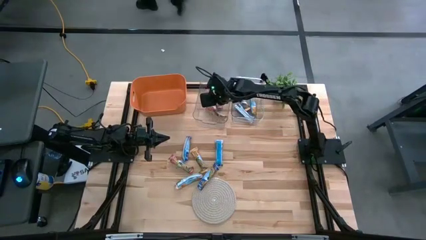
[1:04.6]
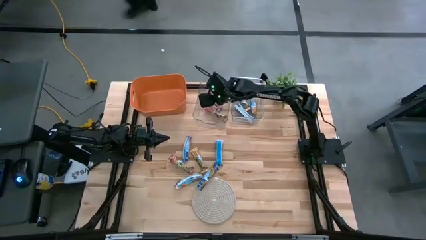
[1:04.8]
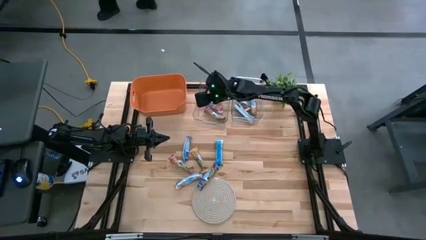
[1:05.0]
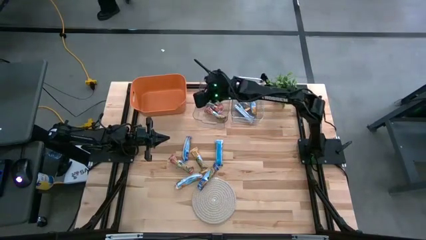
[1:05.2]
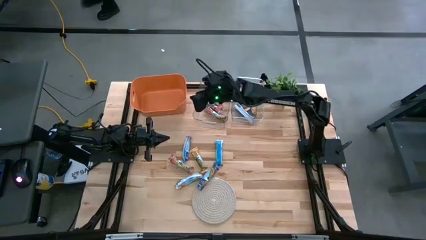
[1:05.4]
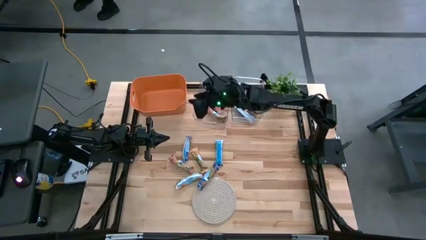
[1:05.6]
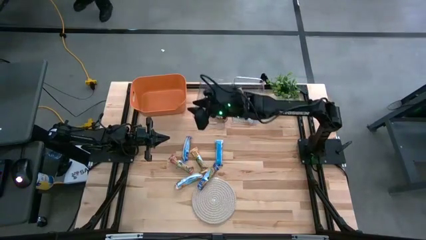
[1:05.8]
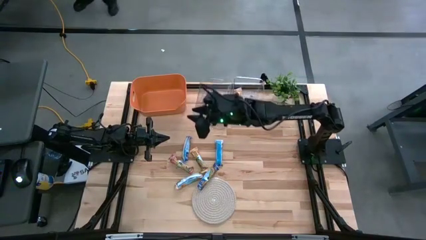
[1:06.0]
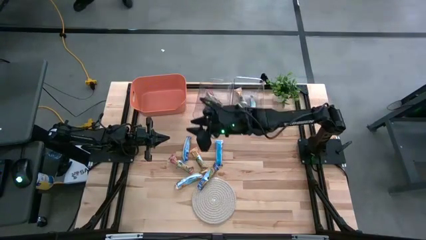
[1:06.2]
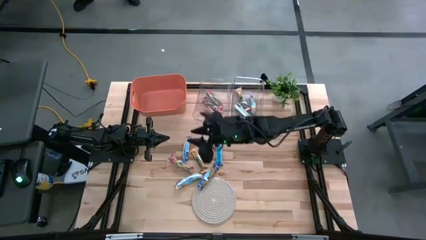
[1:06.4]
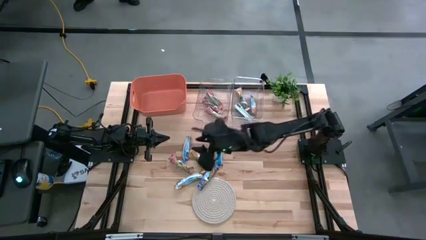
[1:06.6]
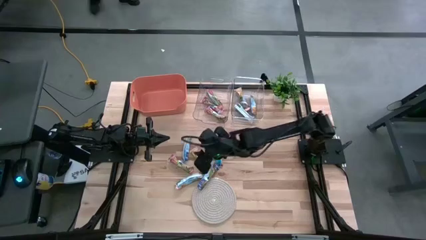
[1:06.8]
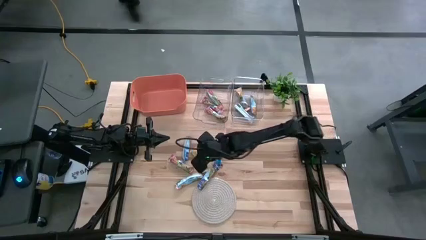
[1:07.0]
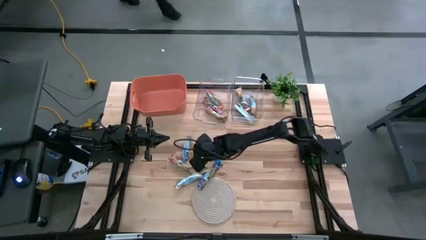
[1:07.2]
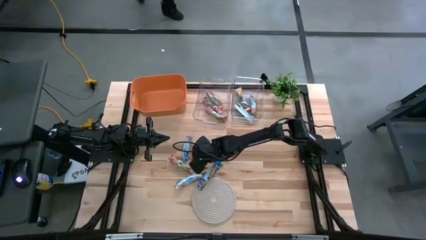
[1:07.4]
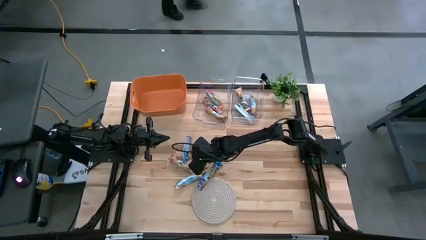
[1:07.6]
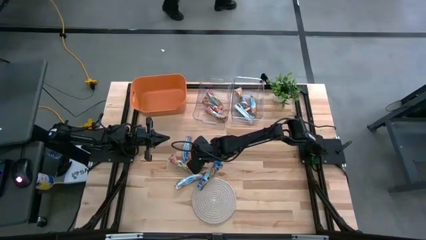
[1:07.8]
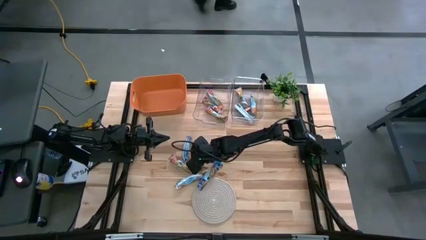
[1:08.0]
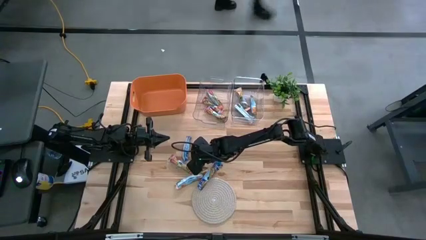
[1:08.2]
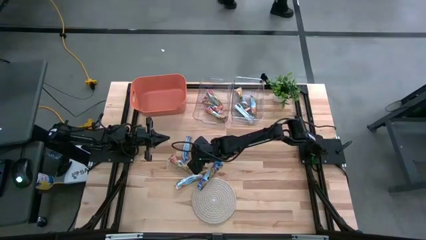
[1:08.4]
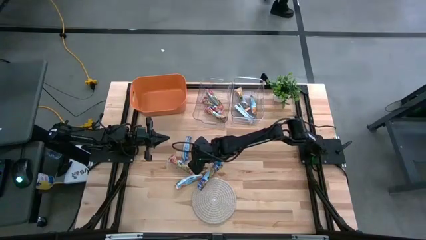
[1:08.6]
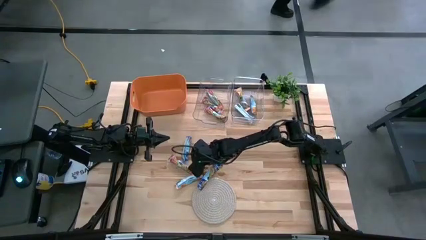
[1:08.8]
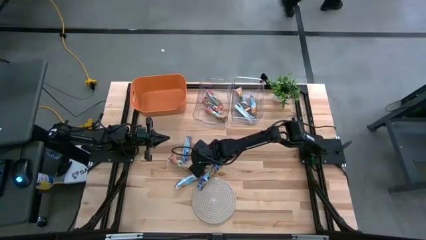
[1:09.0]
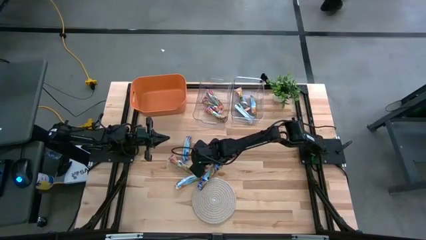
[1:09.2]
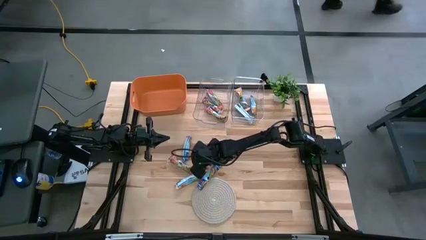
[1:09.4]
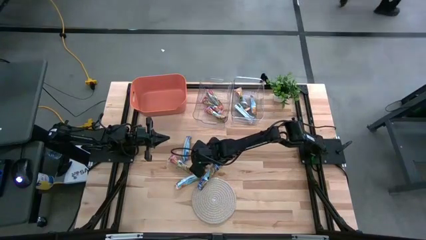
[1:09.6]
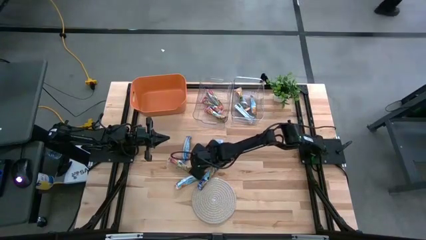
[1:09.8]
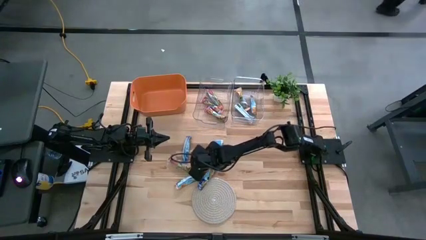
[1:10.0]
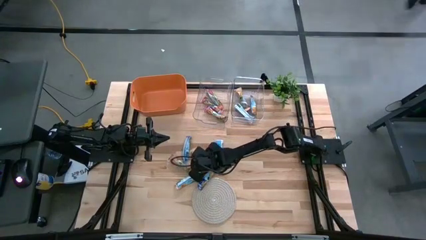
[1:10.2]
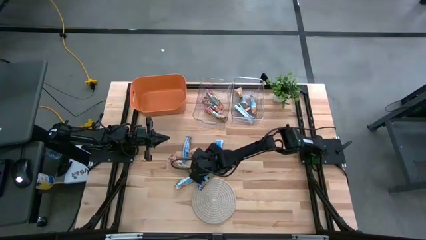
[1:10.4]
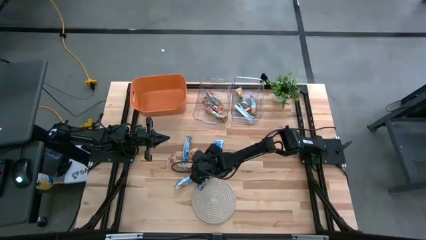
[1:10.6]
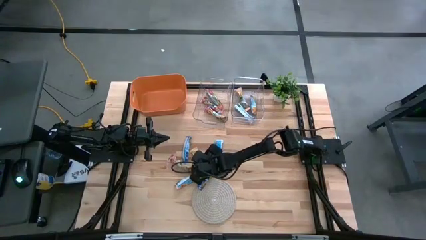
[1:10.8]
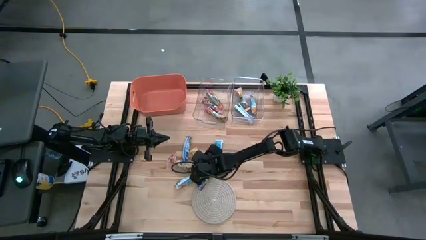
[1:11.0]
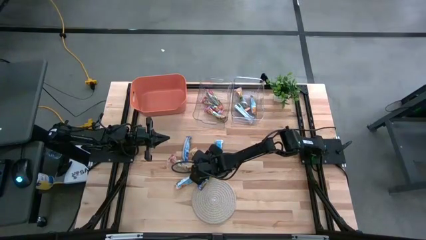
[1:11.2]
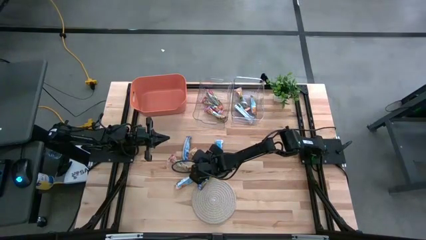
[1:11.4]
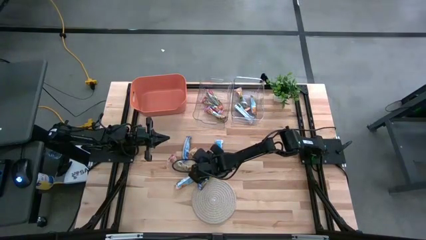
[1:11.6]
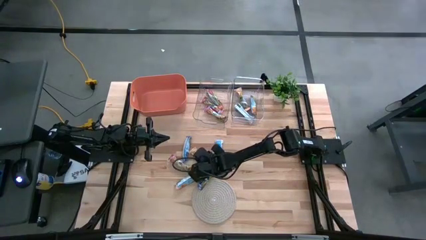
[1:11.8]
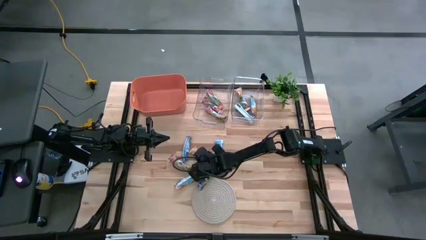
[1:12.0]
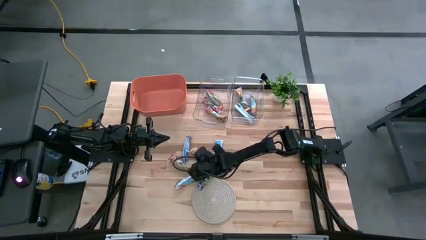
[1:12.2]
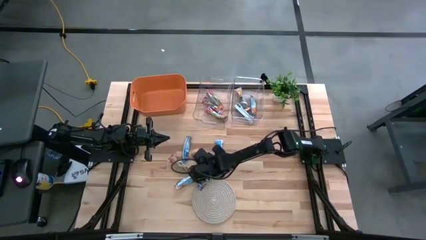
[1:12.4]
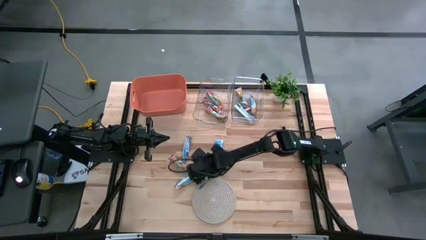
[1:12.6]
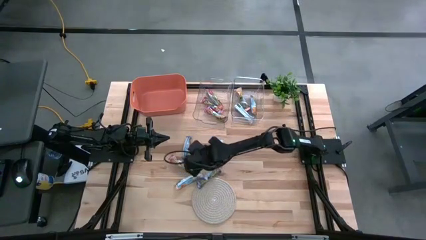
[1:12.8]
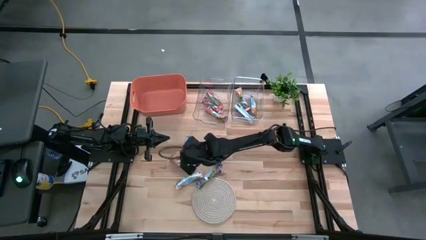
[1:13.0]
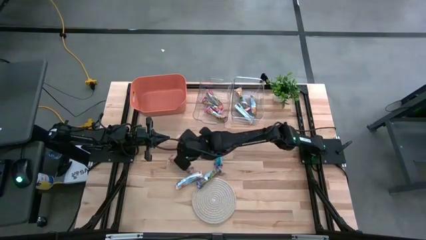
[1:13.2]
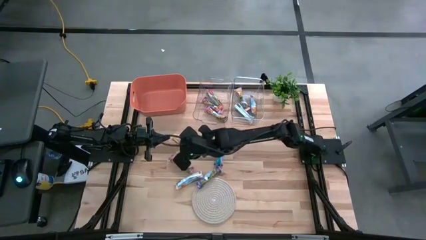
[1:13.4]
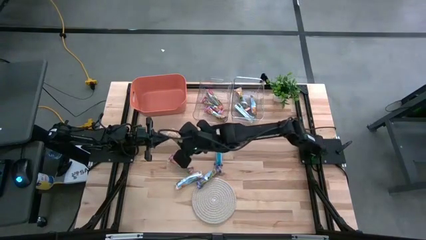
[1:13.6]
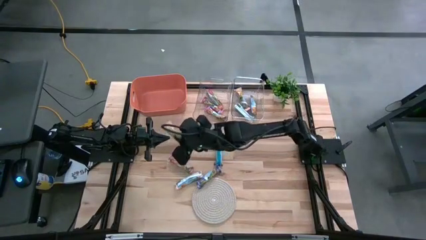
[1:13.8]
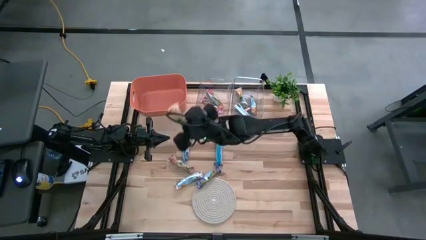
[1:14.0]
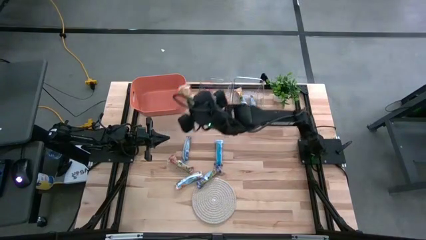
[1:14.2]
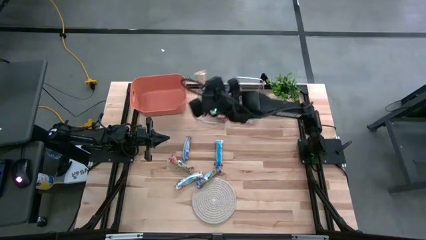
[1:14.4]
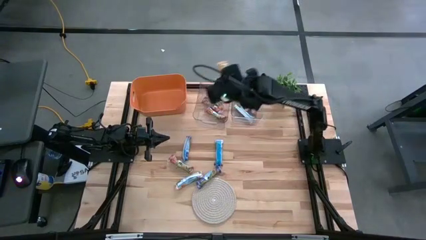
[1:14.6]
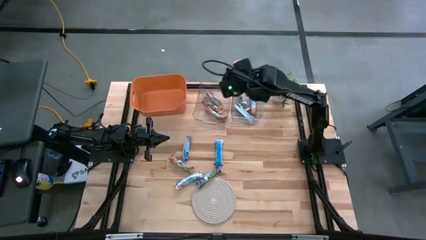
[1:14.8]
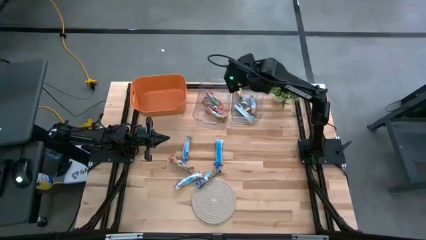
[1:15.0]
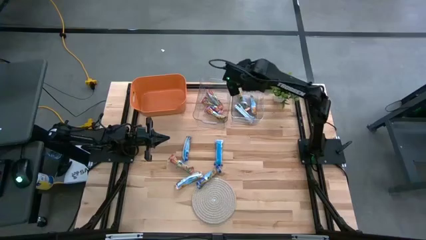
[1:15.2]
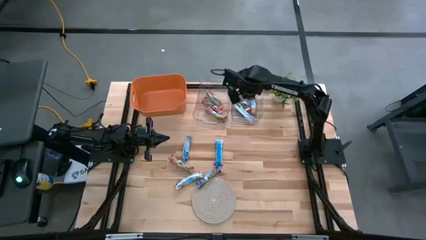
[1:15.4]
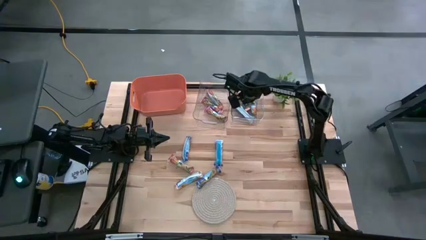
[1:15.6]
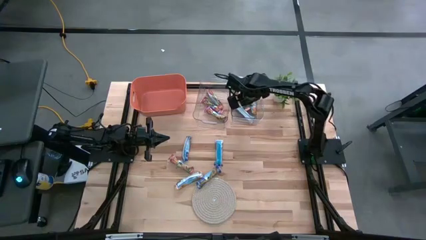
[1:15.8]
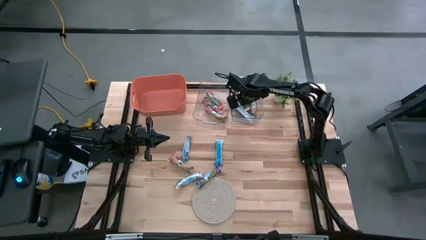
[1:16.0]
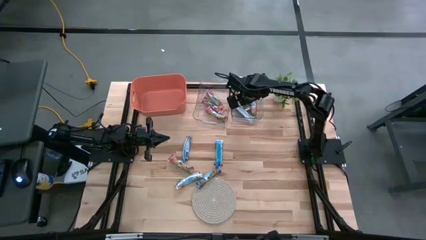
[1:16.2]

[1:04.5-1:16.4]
Task: Pick and place Granola Bars by type
Put the yellow granola bar into the right transparent bin
